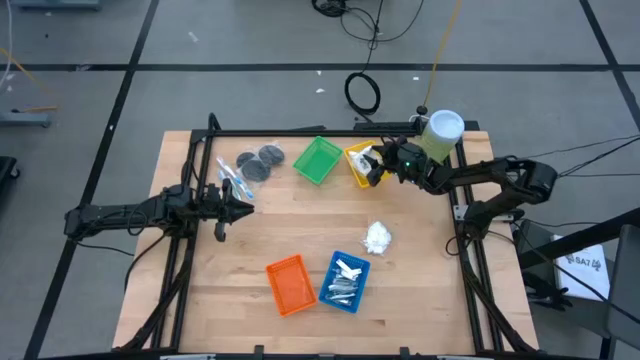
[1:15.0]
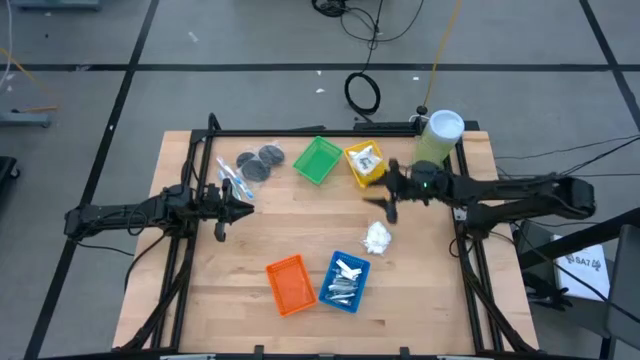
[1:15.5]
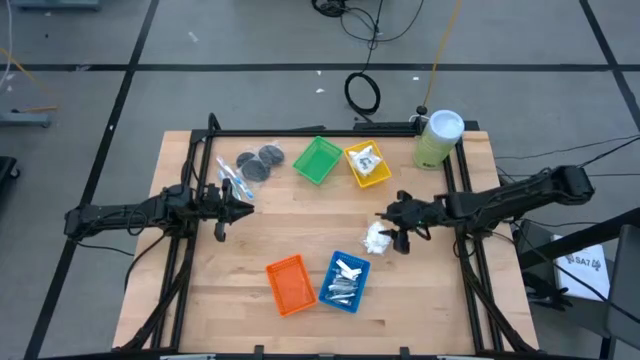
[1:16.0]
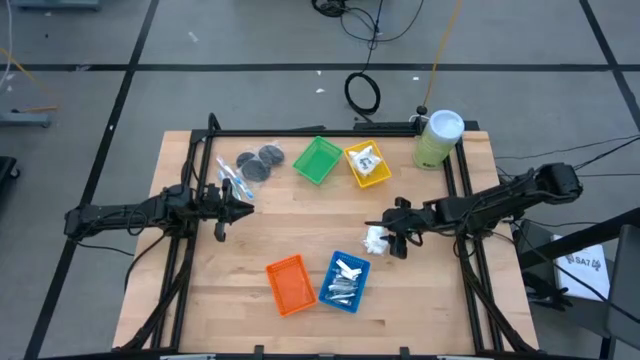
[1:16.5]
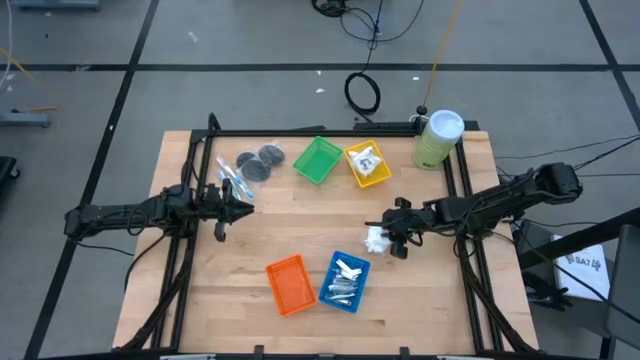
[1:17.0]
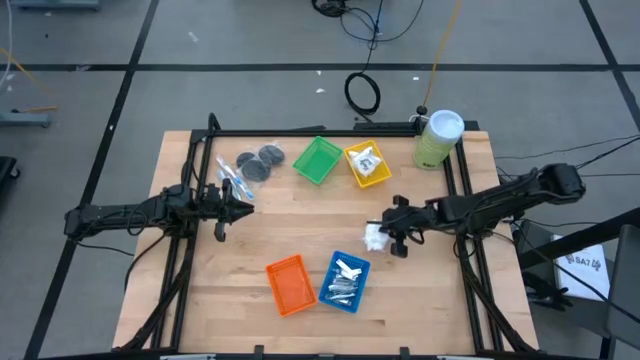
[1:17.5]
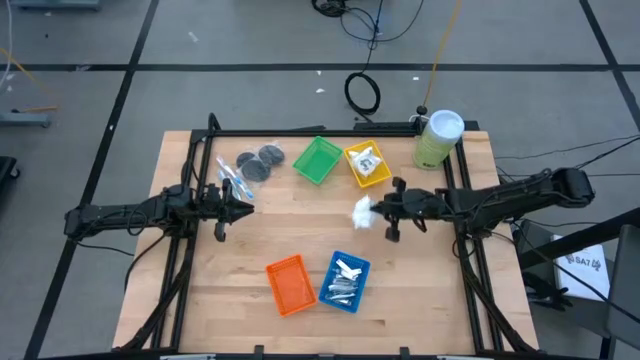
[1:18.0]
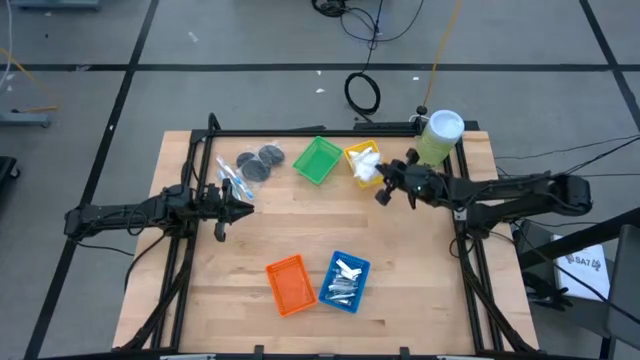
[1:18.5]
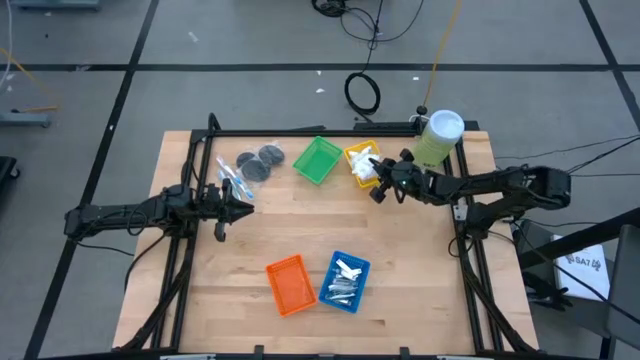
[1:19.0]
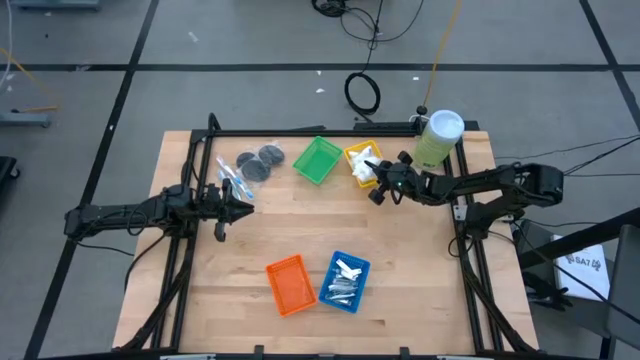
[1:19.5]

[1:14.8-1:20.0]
Task: Pick & Place Travel size toiletries
Put the white cotton pack into the yellow bin

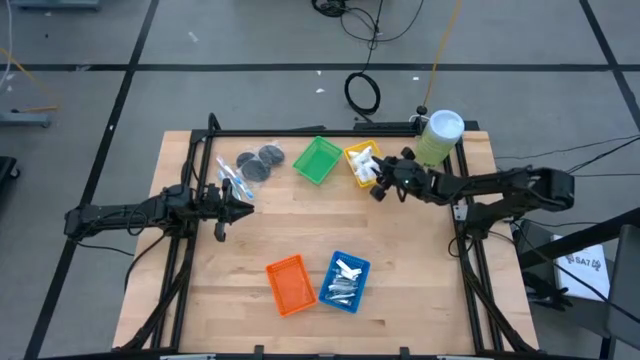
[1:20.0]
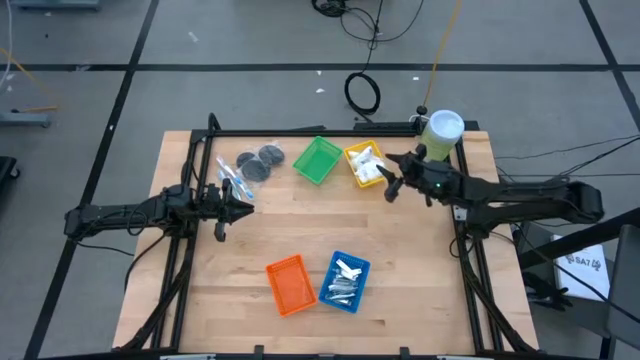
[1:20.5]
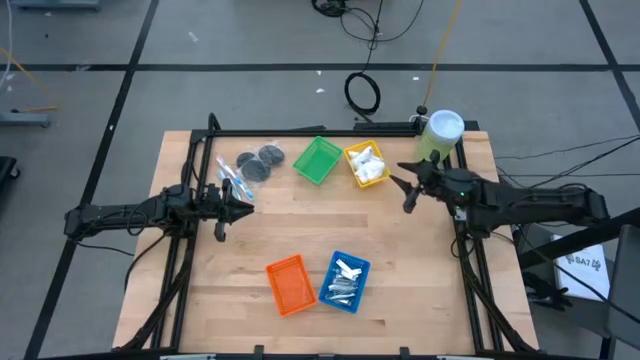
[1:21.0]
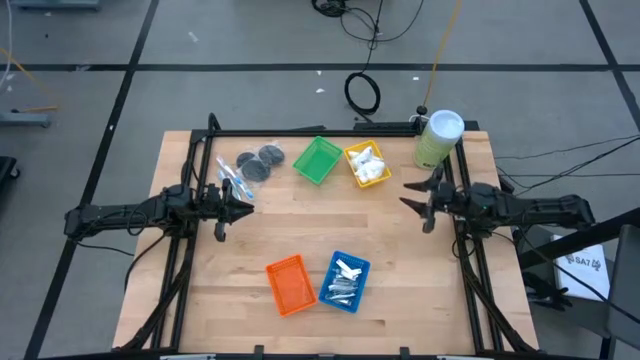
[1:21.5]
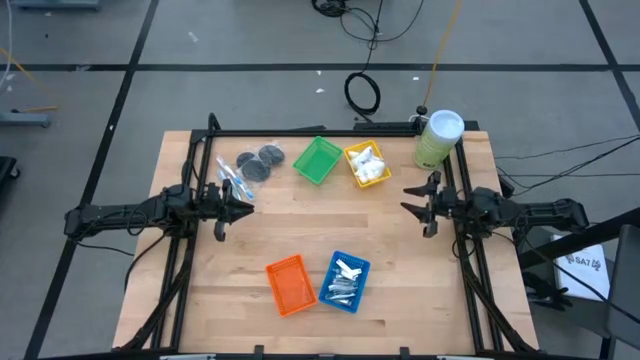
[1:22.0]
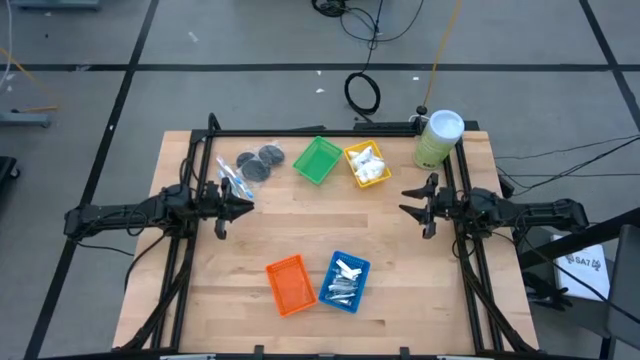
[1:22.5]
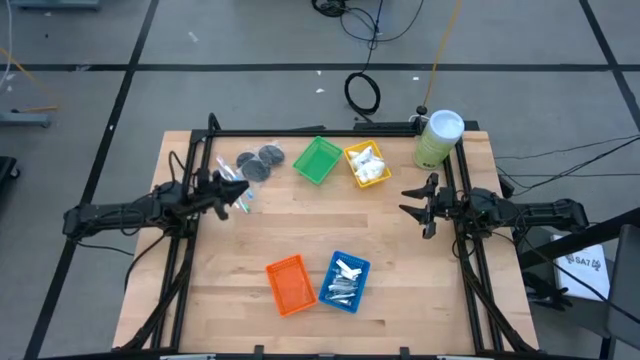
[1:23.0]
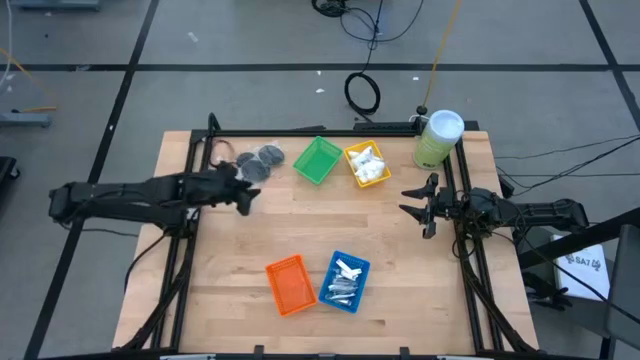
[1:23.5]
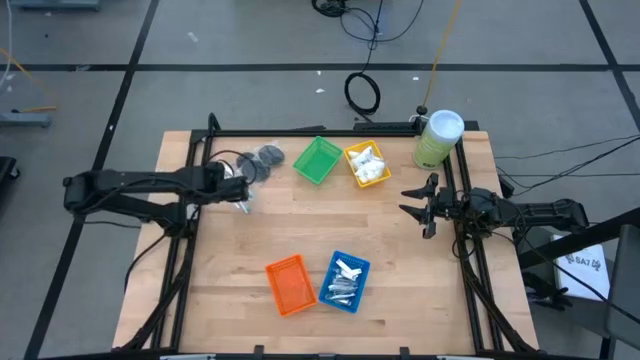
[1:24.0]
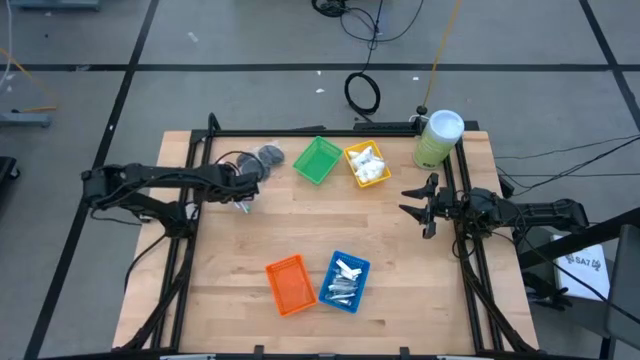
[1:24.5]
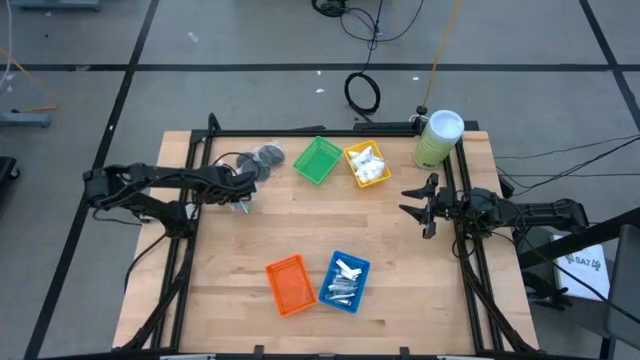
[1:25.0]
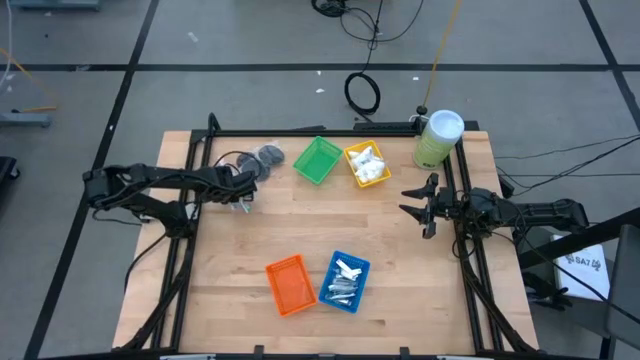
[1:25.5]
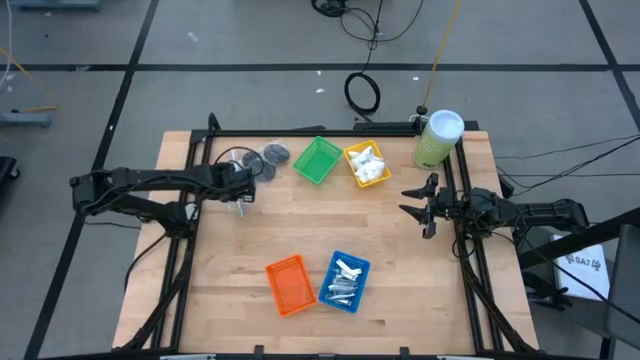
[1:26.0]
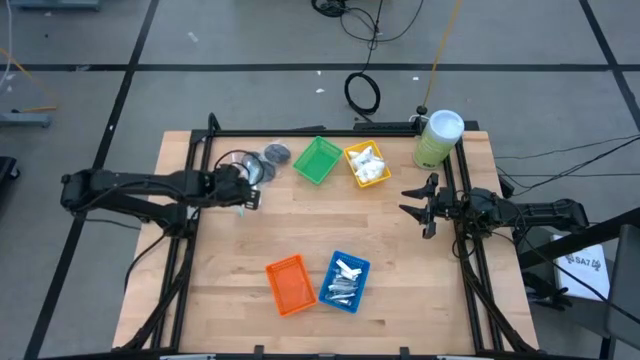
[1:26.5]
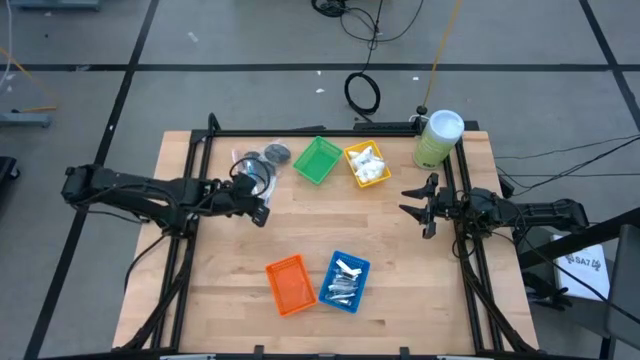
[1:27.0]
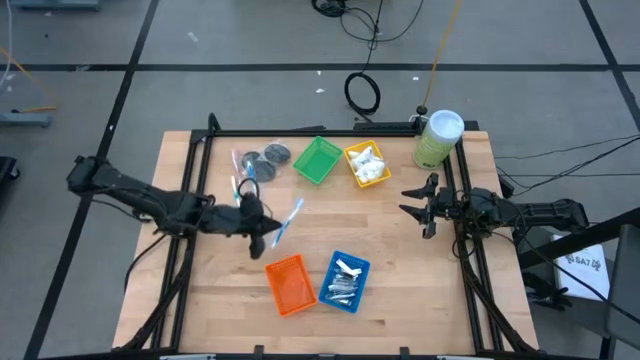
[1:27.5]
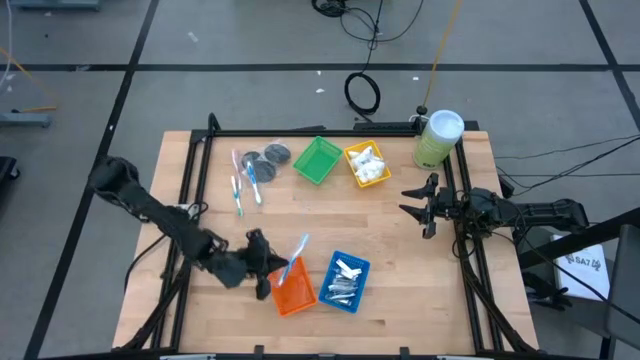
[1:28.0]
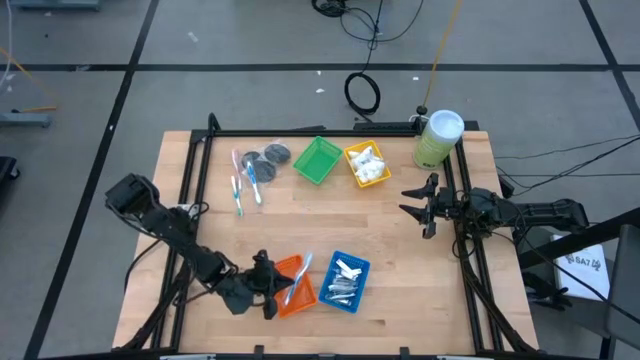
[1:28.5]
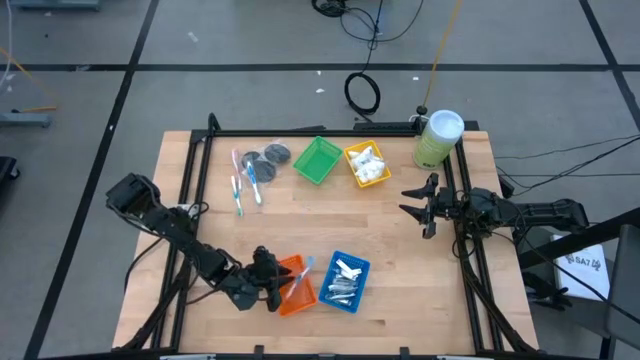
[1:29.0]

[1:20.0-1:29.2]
Put the blue toothbrush into the orange bin

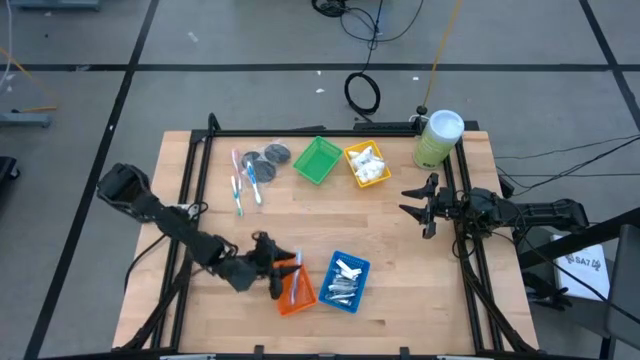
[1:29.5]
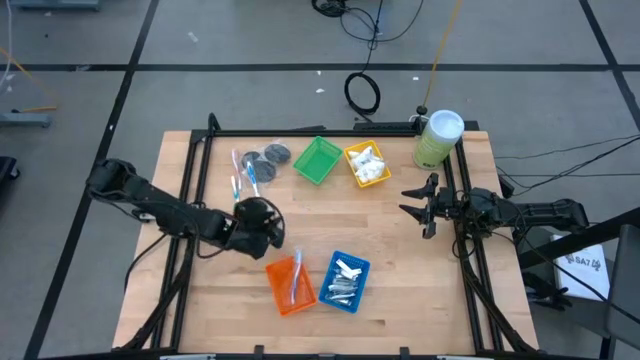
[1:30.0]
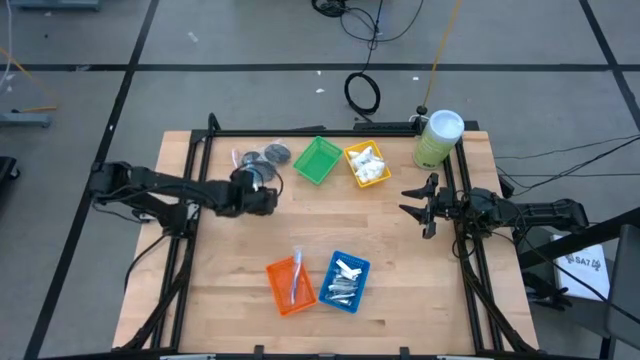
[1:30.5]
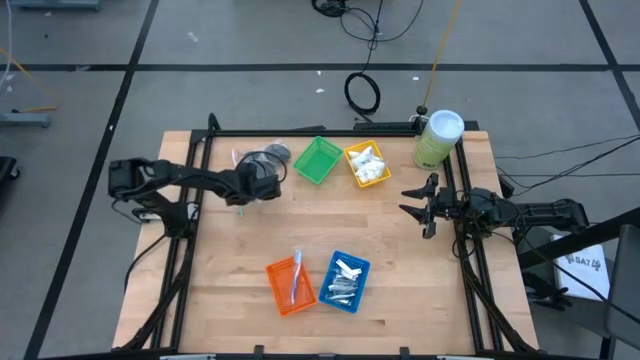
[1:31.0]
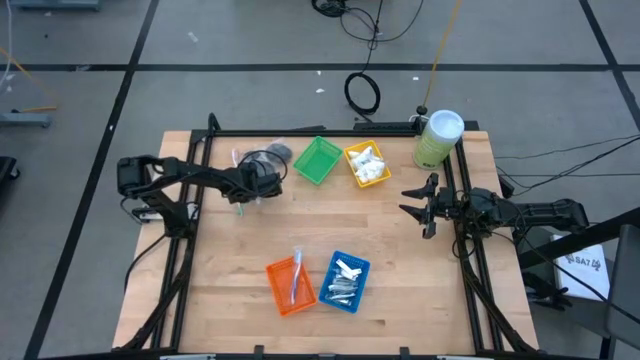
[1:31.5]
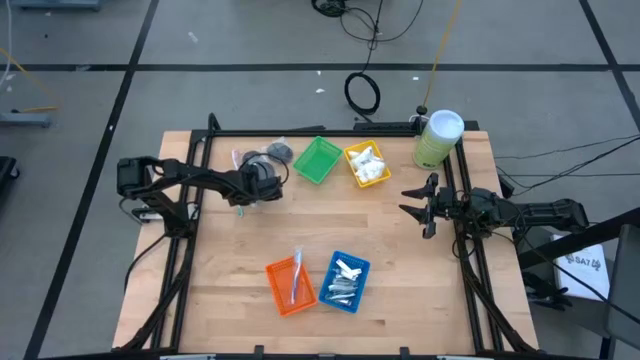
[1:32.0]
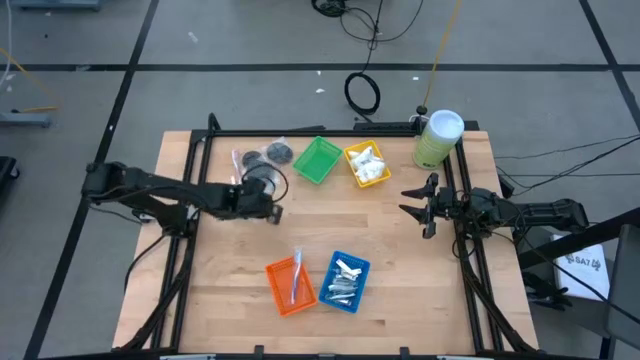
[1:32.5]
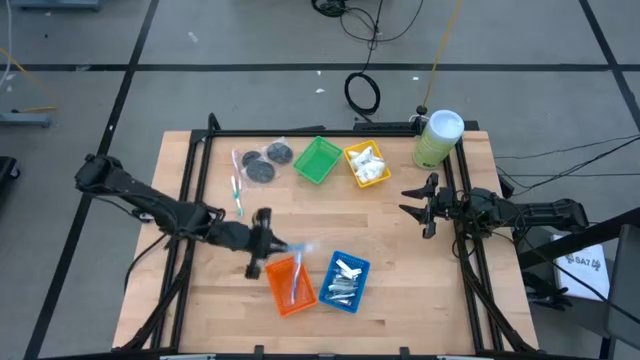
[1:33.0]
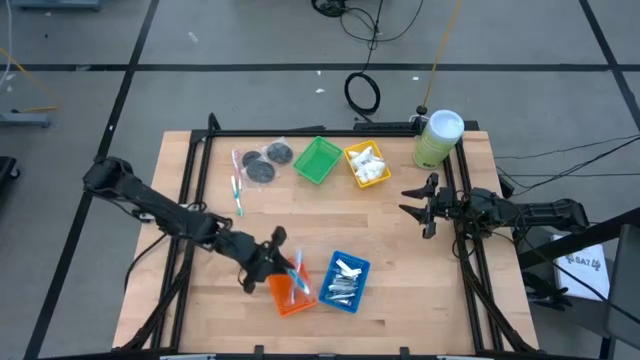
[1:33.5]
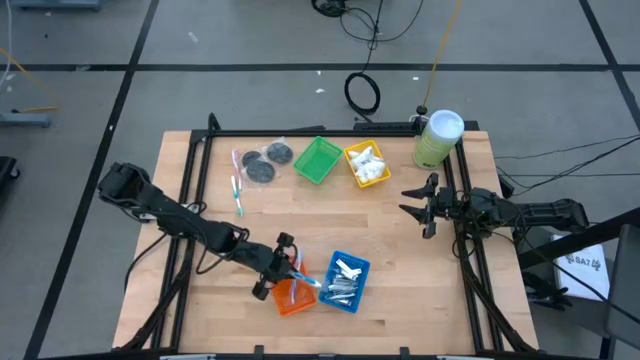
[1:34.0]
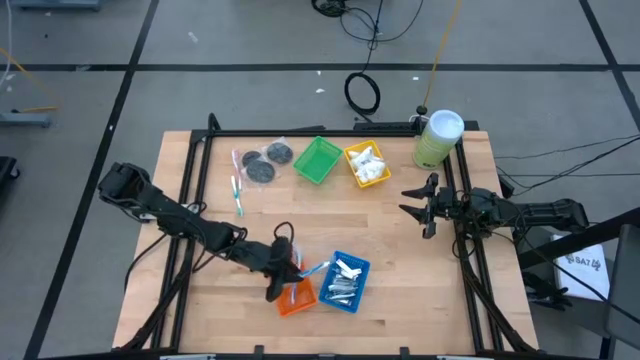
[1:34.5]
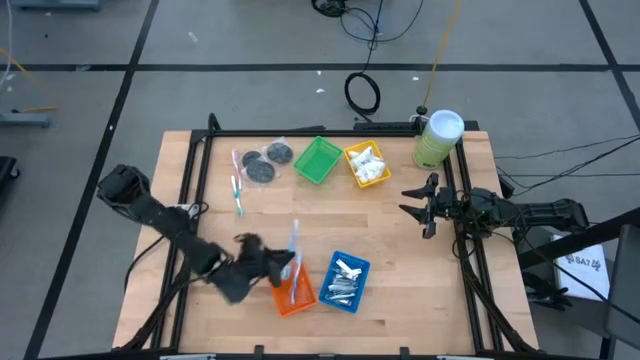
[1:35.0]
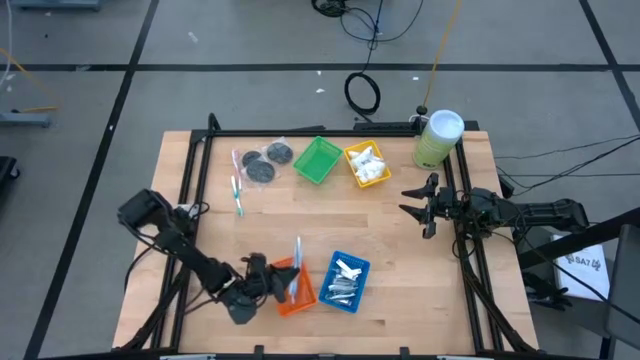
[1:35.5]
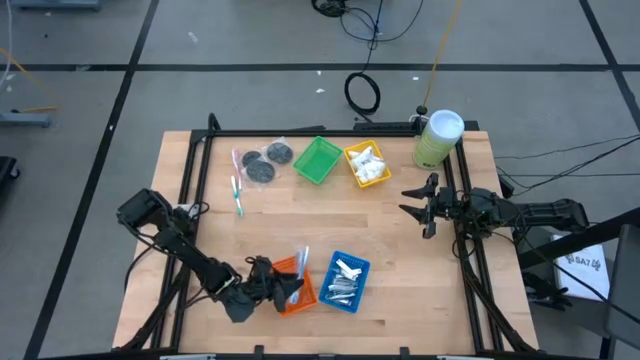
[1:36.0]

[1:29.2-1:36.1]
Put the blue toothbrush into the orange bin
